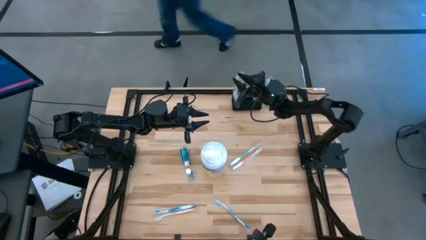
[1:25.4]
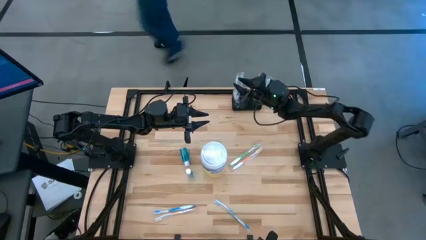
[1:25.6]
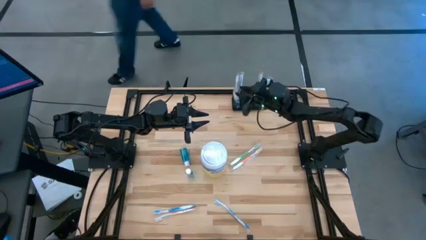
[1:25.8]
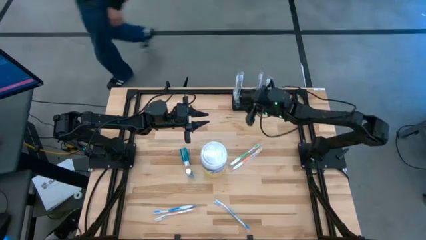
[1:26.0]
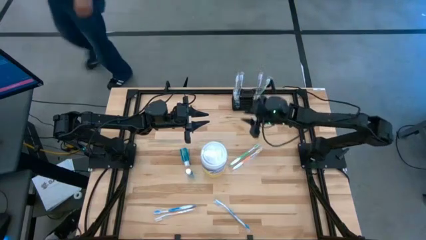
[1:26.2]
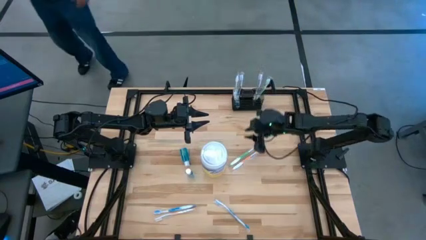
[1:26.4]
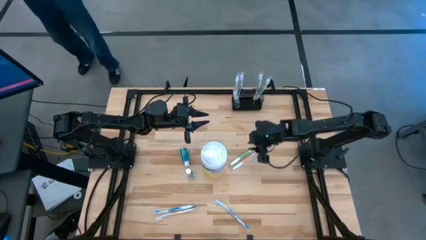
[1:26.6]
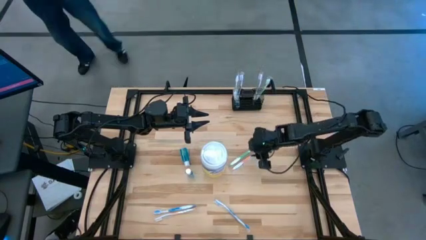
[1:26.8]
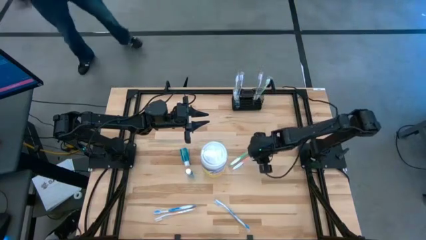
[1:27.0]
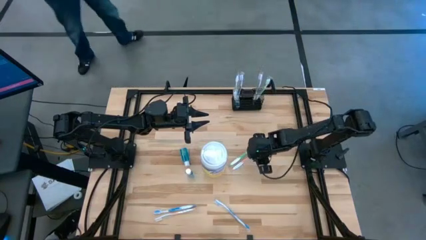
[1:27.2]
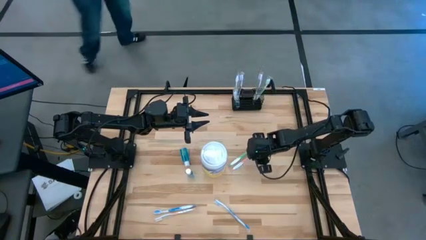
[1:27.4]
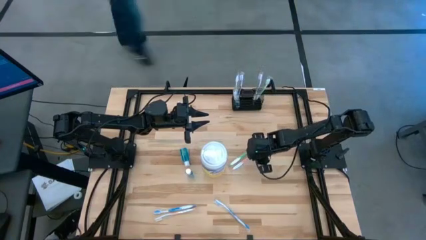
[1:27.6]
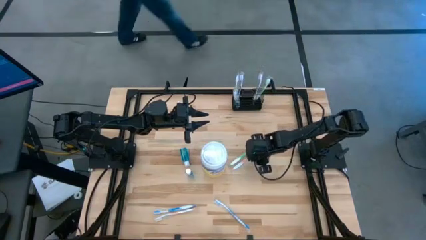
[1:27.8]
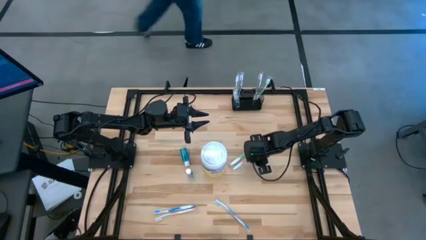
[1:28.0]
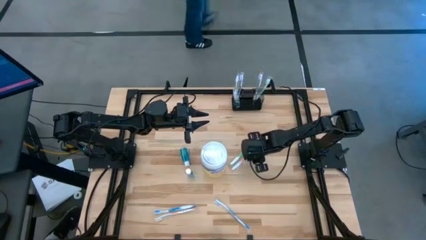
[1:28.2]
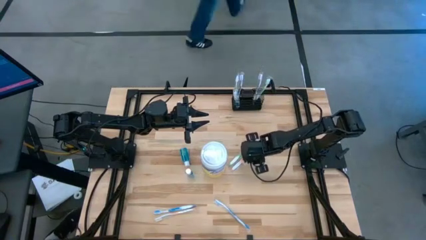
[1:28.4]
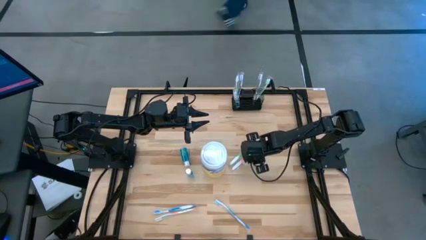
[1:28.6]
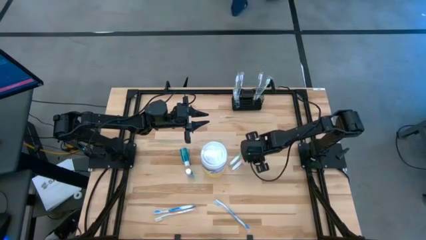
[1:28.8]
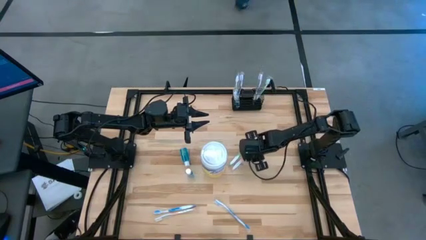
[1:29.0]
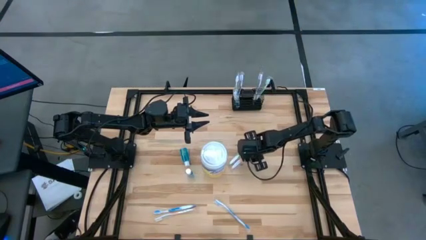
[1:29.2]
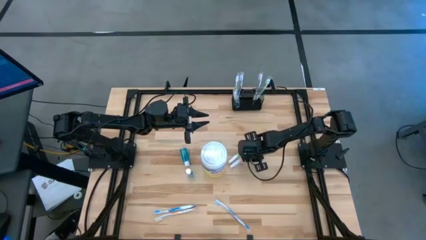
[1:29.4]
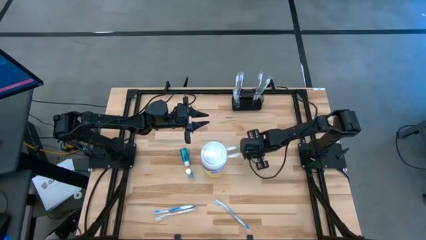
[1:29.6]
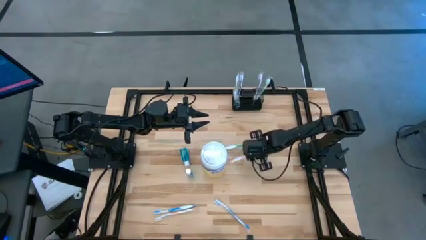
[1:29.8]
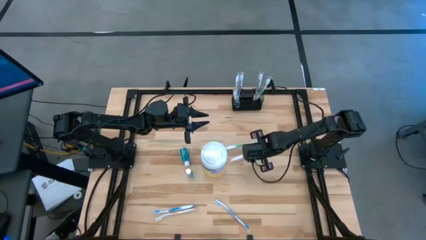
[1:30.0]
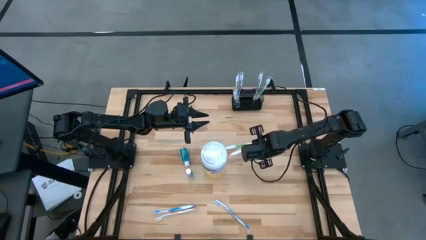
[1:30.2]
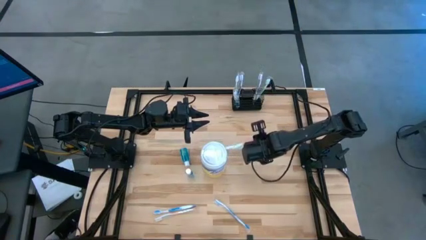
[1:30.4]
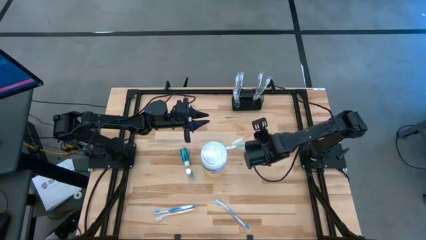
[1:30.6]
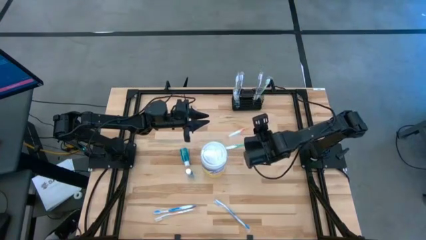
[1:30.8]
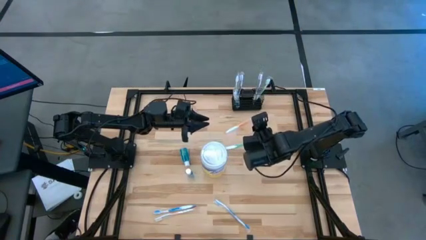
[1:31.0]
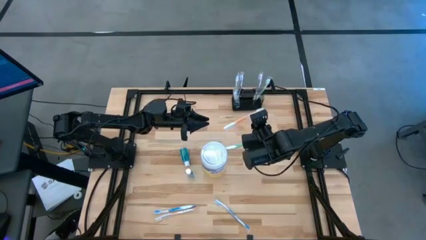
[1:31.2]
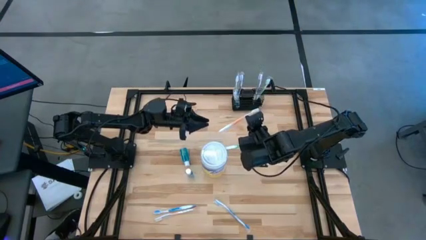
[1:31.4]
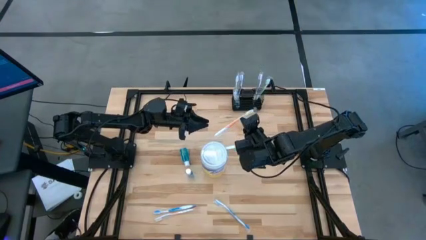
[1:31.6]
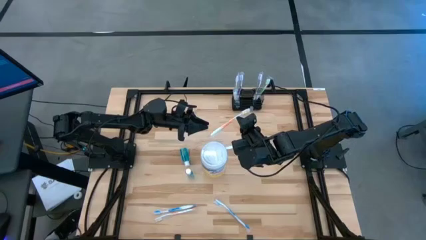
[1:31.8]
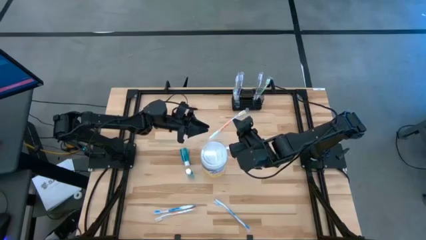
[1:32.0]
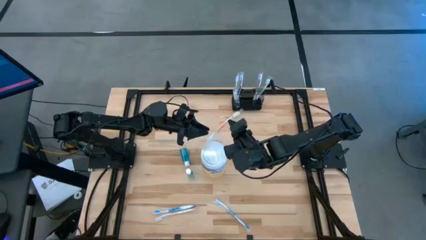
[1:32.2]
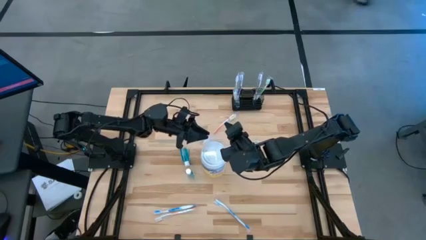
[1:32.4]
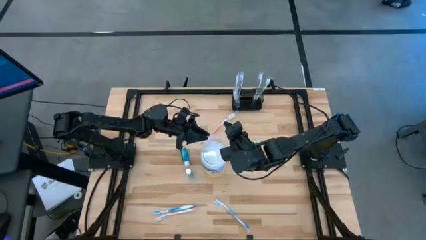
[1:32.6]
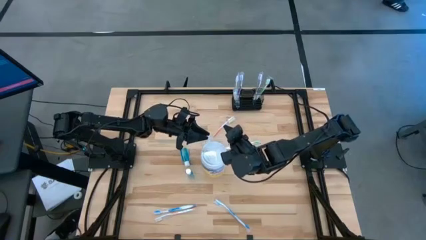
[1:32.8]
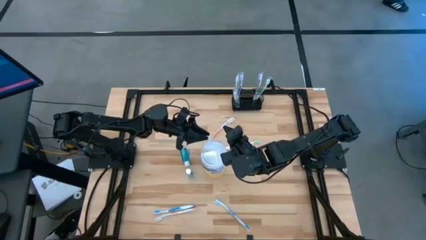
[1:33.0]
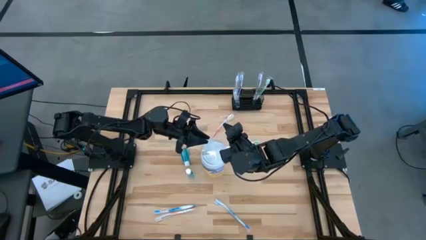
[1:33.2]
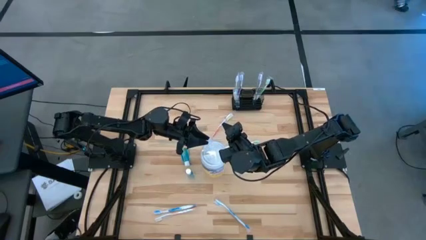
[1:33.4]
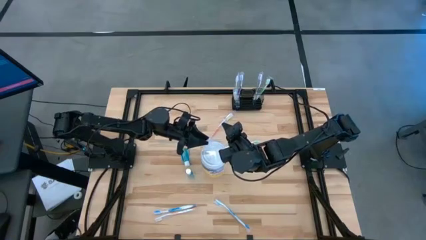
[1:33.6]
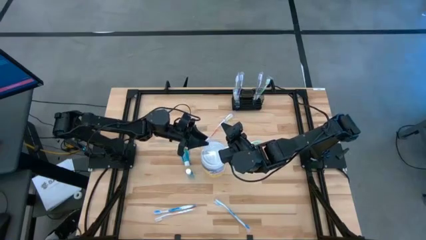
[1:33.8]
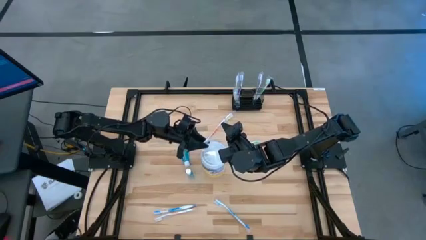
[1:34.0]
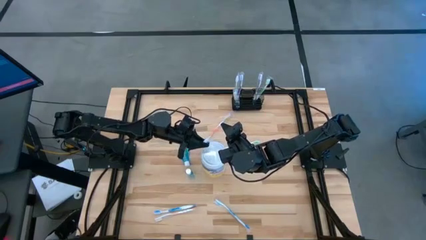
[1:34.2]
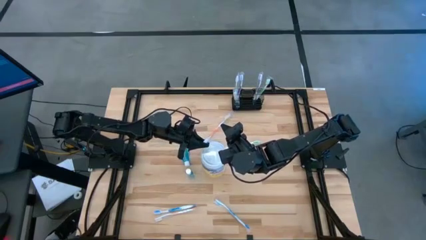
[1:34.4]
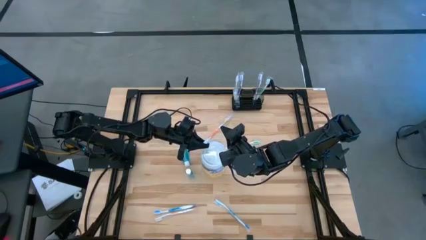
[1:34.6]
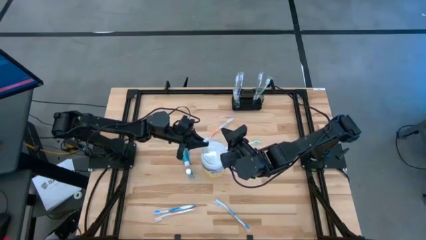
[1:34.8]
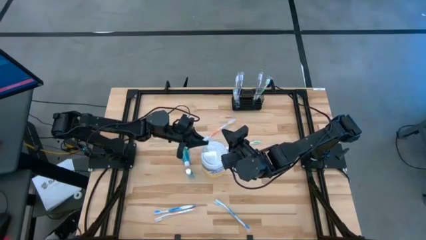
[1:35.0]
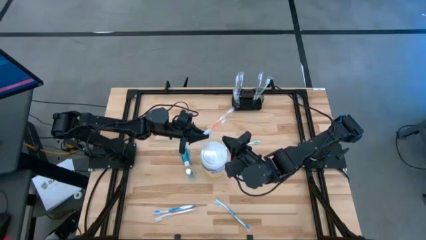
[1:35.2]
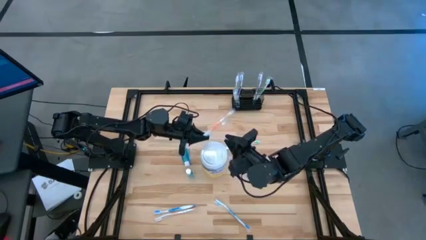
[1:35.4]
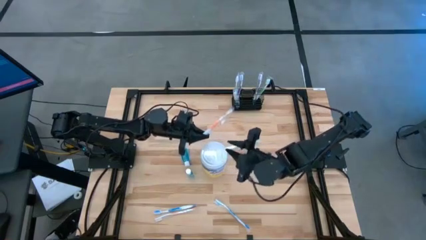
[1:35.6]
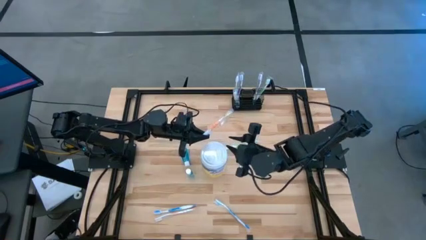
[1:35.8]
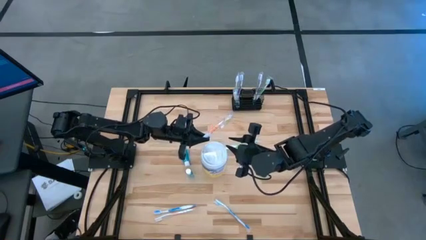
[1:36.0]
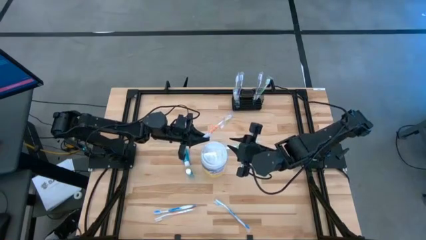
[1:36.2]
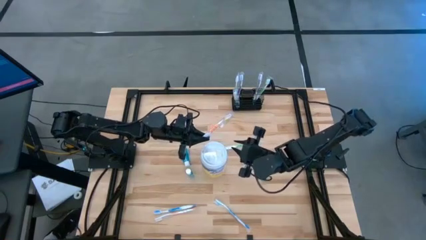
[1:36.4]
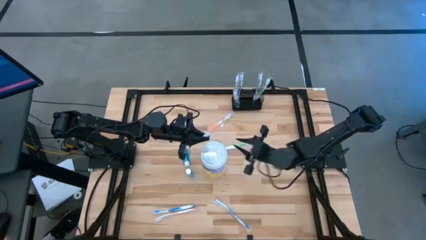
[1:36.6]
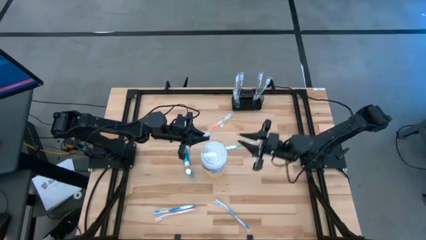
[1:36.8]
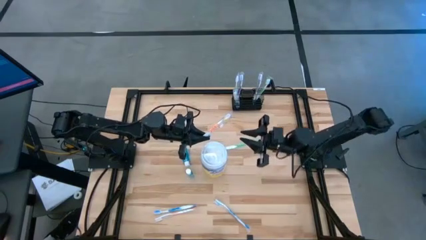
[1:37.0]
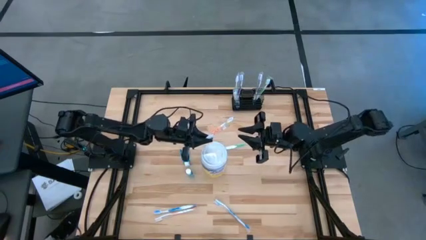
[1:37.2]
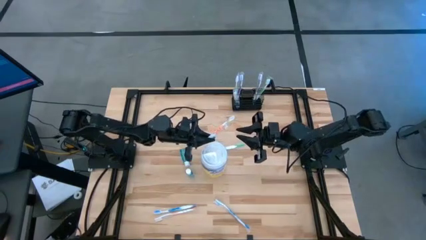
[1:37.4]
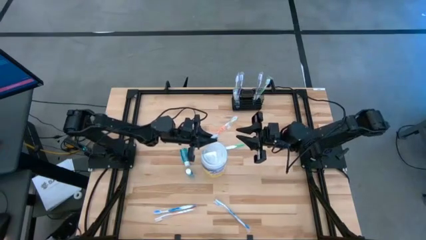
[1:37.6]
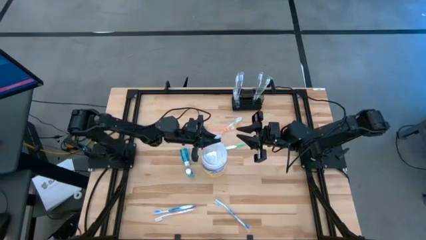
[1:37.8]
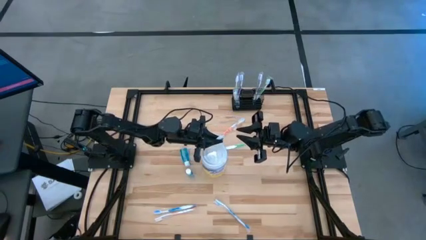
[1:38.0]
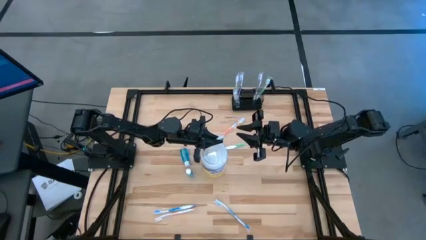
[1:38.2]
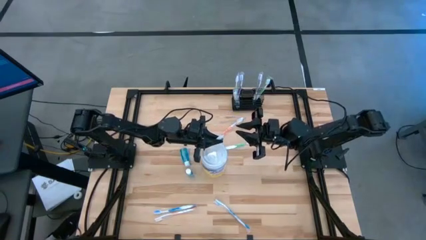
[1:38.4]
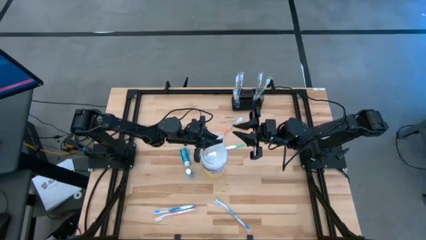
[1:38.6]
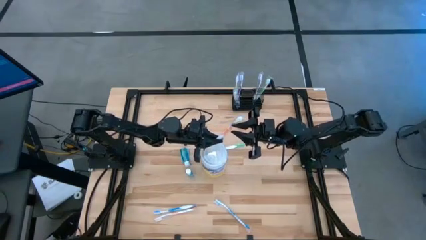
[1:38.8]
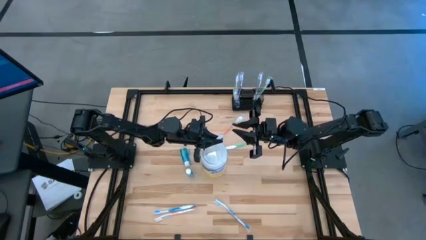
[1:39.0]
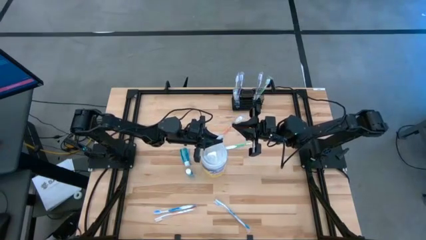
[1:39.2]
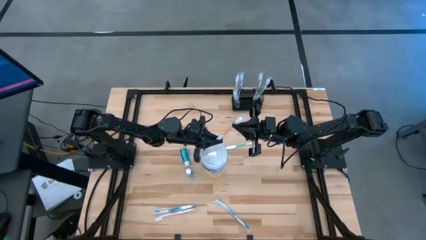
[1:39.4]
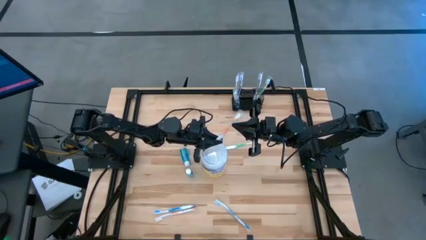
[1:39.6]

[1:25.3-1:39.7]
Task: Pick & Place toothbrushing station
Put the top orange toothbrush into the black mesh organizer
